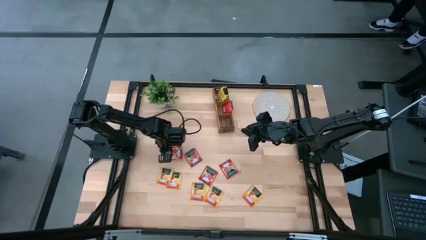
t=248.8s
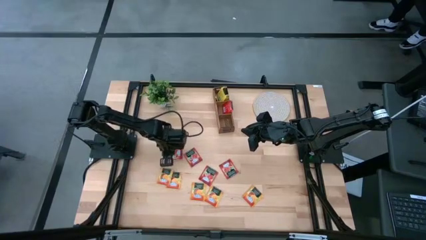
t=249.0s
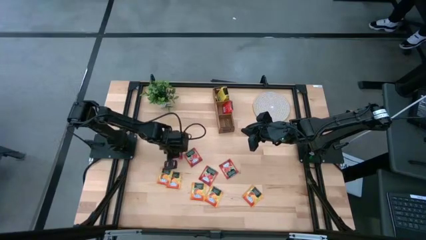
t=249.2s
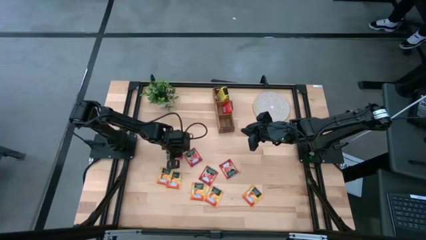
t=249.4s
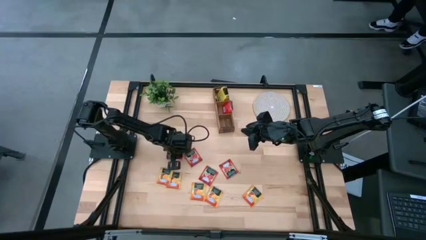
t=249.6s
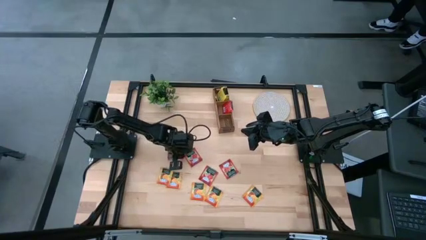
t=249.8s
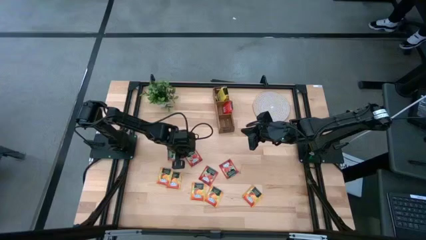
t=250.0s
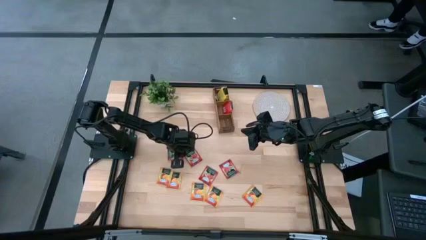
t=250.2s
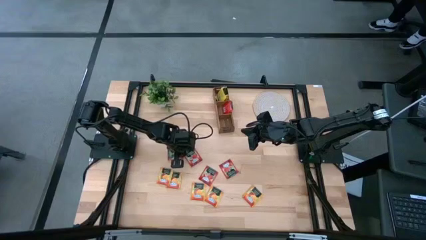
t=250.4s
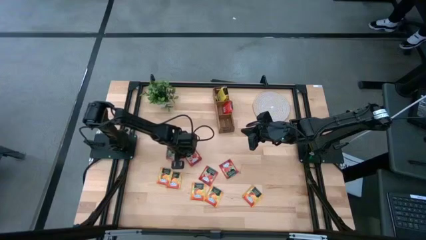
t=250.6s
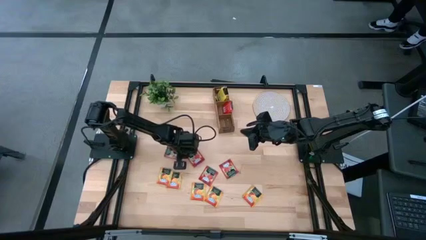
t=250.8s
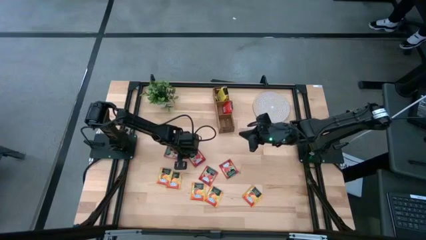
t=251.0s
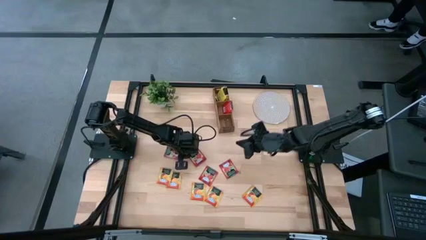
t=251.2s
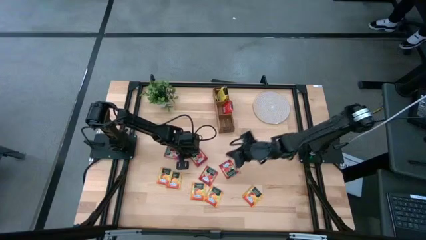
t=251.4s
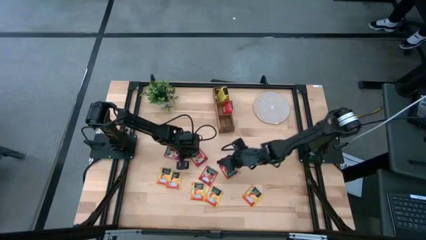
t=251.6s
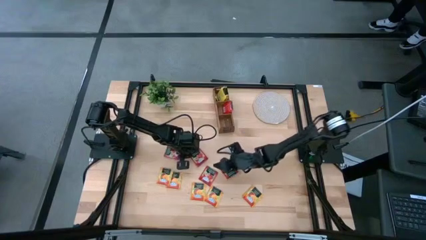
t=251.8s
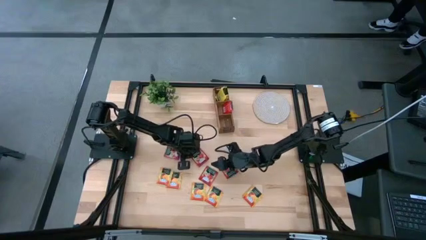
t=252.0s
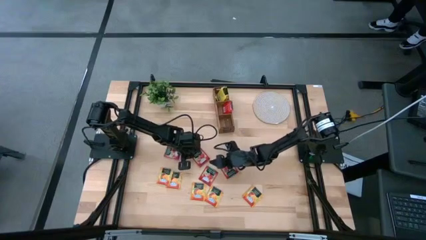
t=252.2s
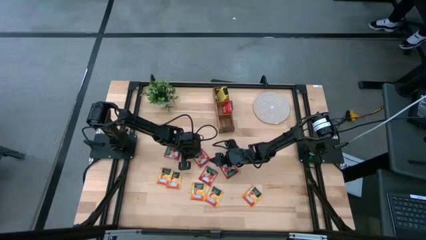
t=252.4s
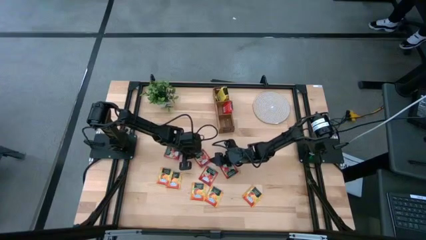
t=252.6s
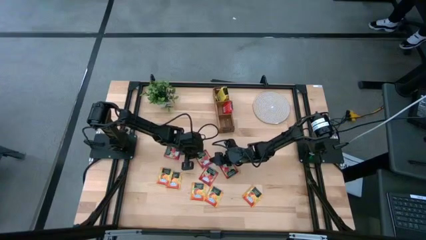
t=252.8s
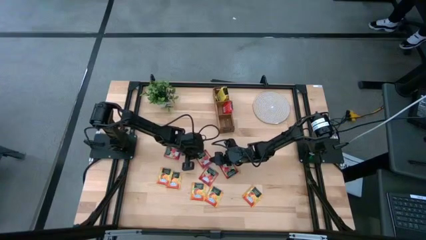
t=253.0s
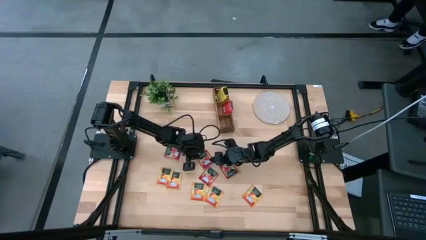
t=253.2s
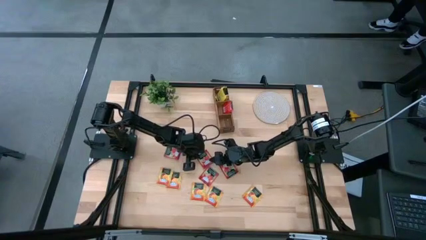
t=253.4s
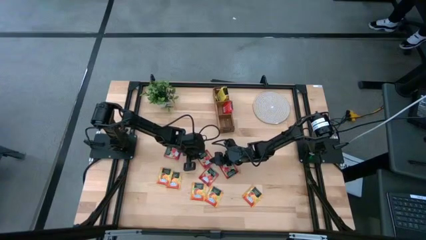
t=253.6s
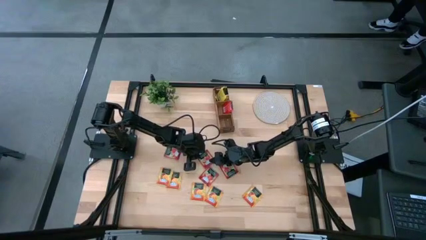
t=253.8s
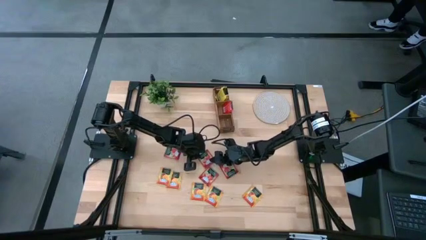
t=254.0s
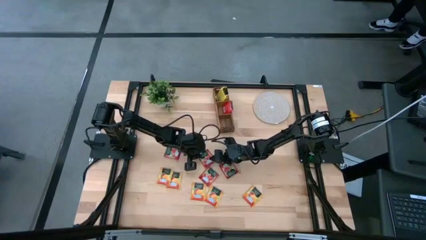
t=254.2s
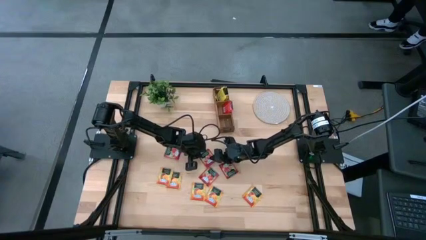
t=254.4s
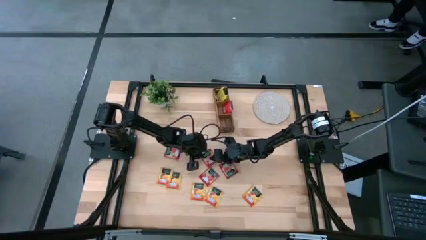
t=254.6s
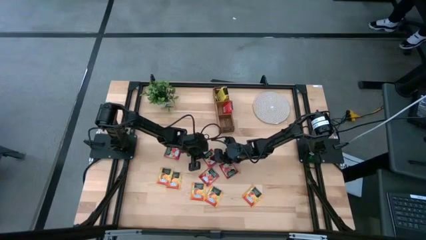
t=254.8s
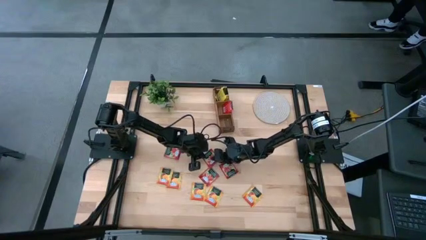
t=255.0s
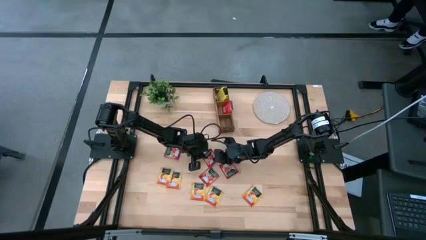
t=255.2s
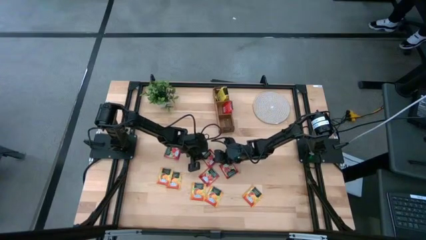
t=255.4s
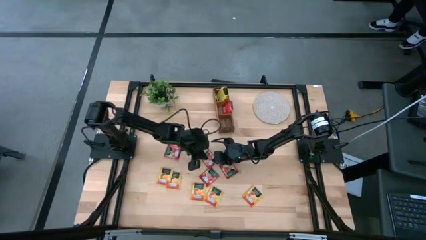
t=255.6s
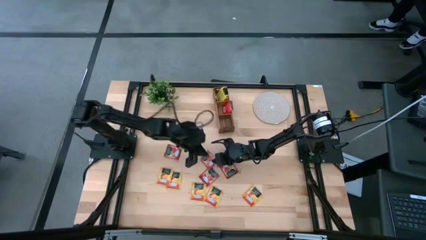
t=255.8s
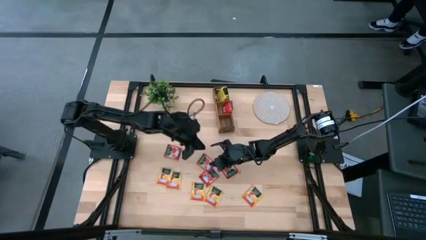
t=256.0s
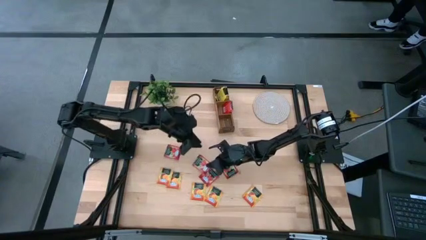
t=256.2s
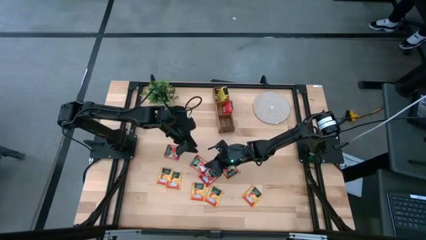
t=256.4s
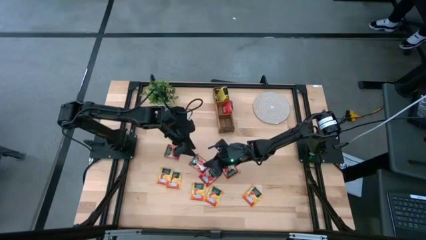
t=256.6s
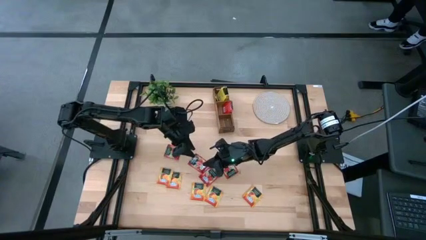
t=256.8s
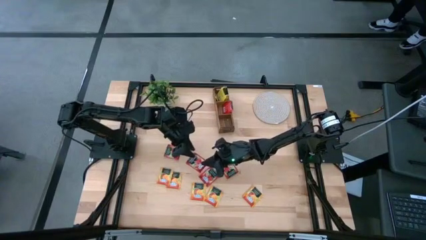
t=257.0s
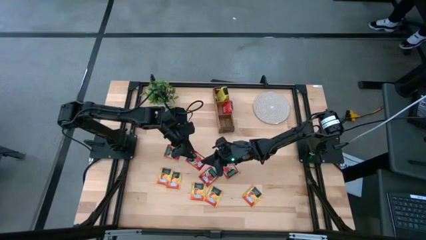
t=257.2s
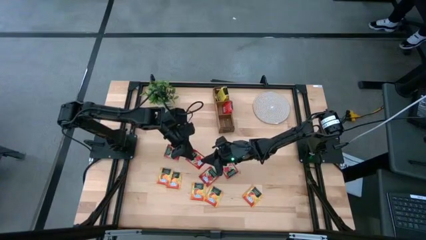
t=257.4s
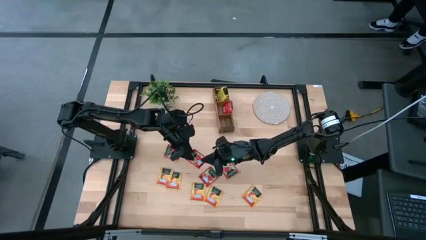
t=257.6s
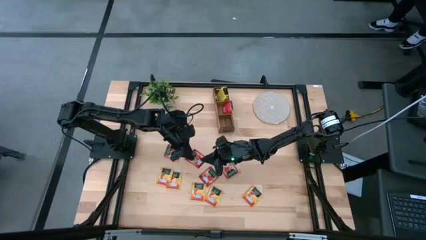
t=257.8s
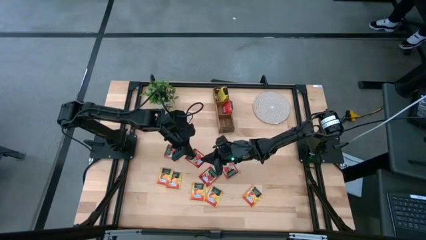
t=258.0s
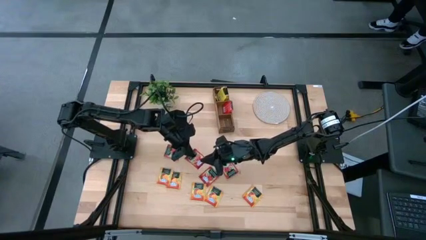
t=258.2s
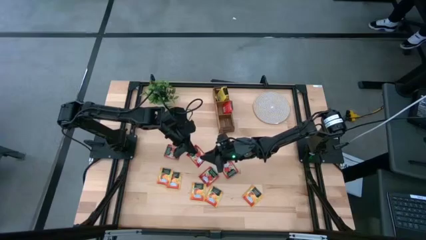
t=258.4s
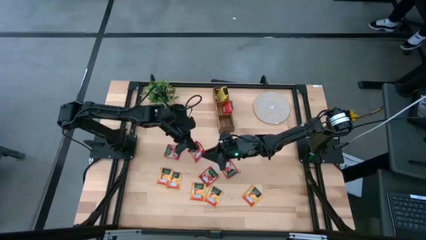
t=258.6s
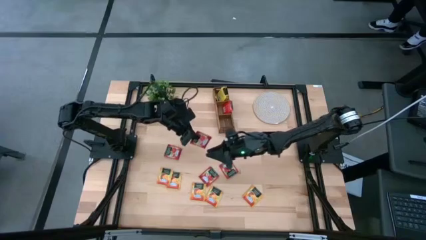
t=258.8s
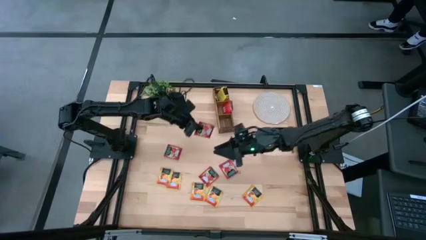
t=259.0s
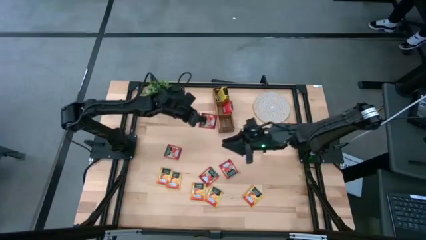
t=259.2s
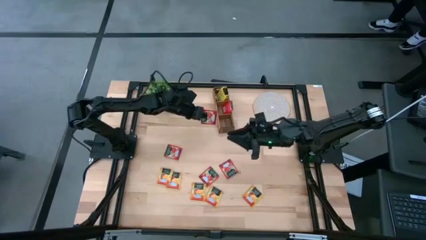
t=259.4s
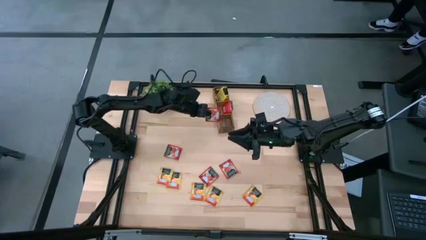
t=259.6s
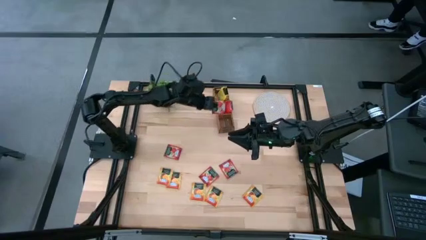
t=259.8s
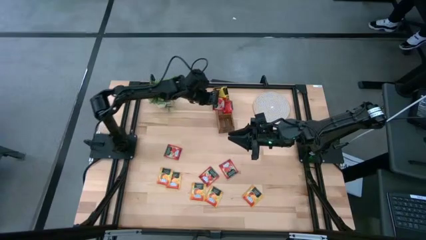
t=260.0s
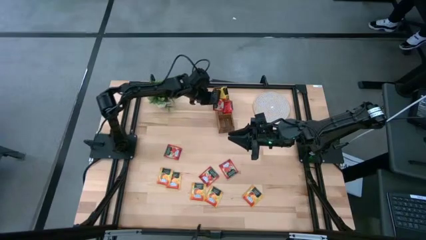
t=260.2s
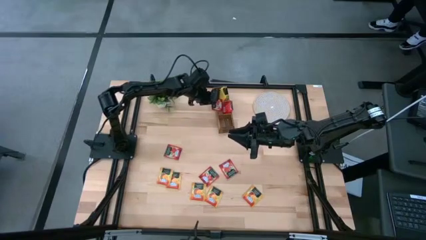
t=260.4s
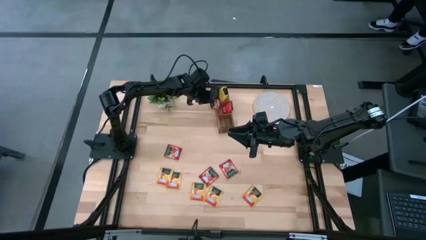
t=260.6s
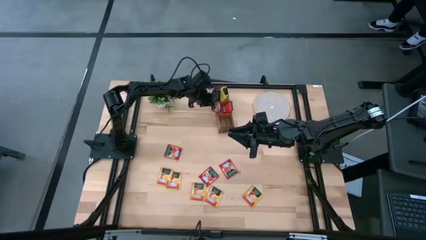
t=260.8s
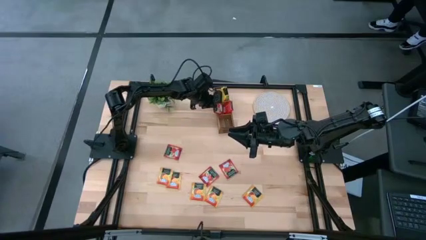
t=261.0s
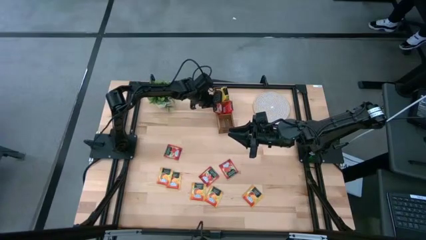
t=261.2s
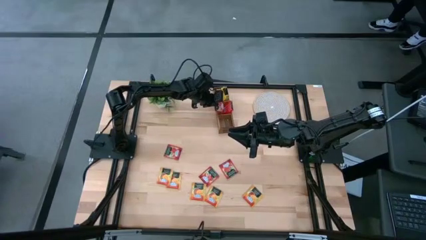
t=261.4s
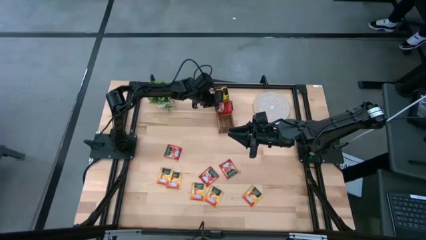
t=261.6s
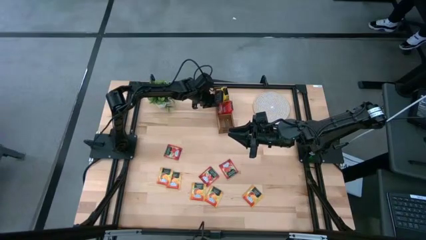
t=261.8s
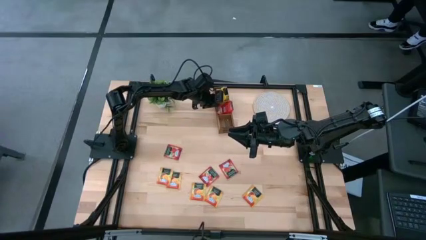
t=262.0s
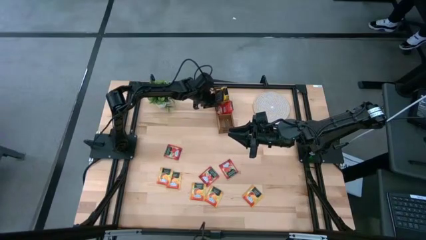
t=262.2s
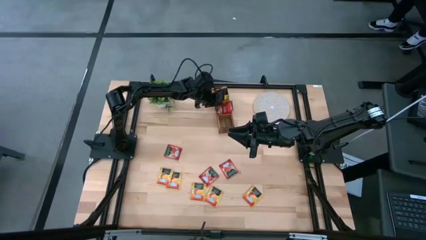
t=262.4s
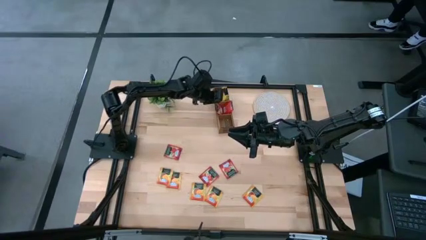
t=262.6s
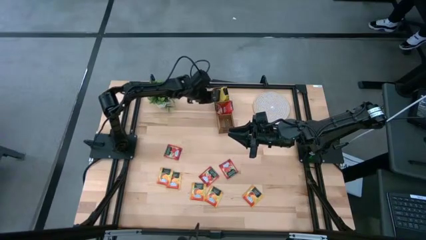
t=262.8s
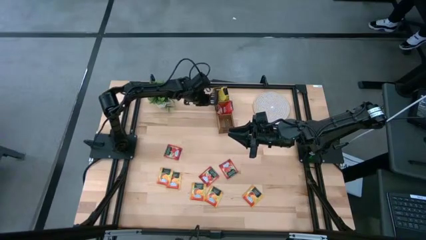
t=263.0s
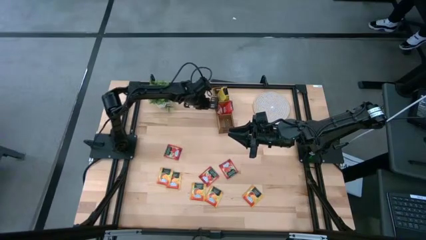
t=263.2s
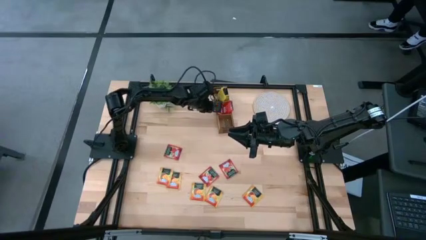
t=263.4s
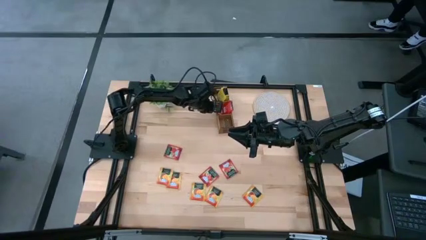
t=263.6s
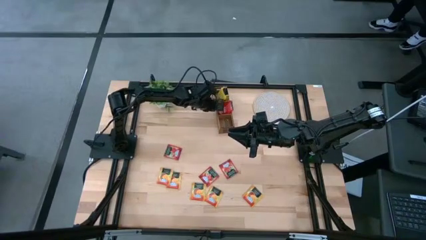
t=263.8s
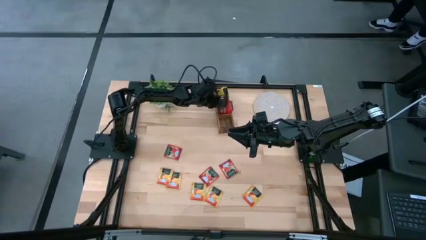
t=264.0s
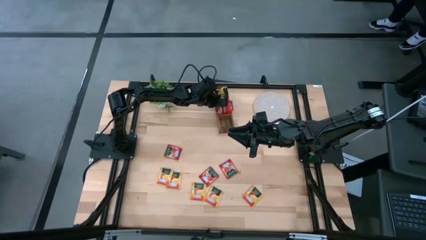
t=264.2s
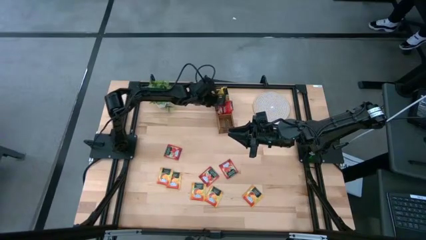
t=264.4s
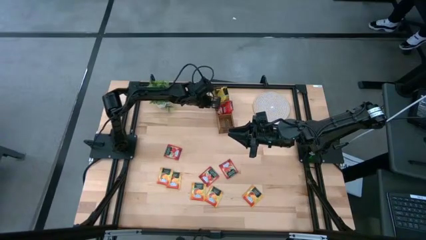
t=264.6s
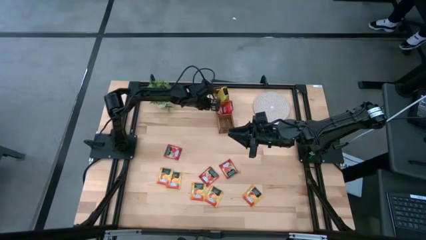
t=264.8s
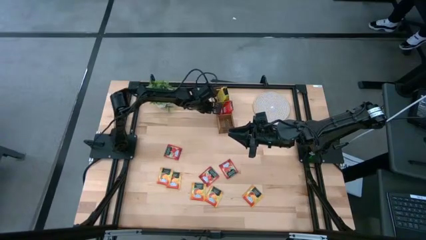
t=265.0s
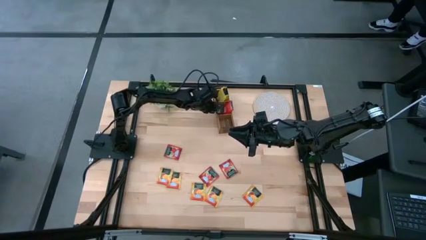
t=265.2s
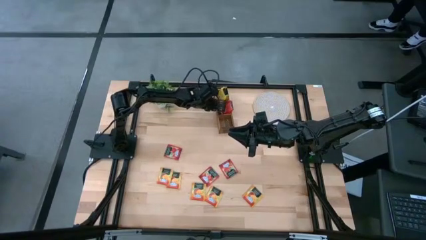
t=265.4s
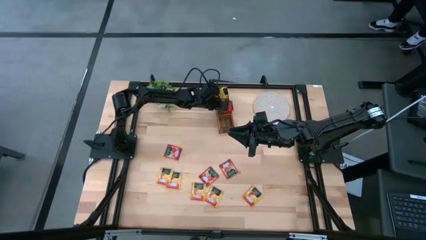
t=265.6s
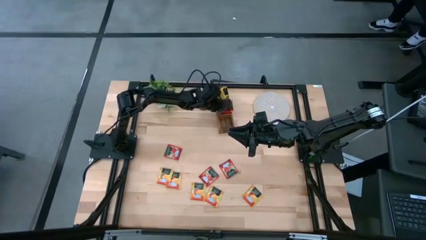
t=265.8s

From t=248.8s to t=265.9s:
Task: Pick & Place Tea
Put the red tea bag into the middle section of the wooden organizer
